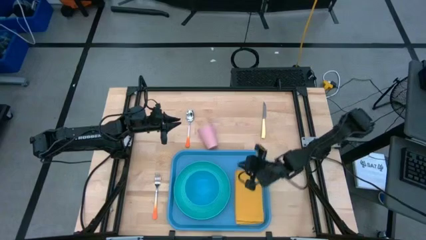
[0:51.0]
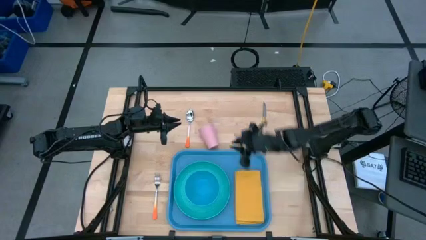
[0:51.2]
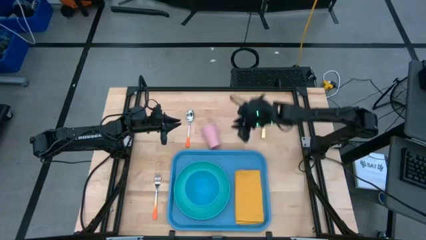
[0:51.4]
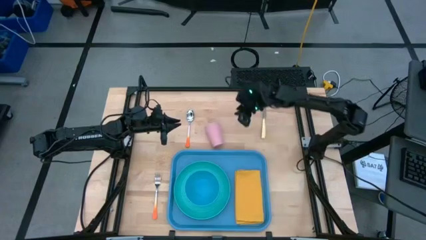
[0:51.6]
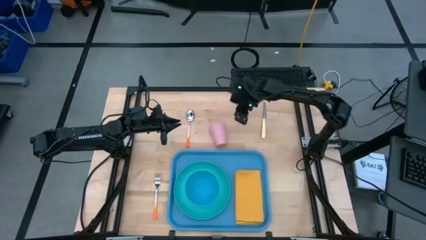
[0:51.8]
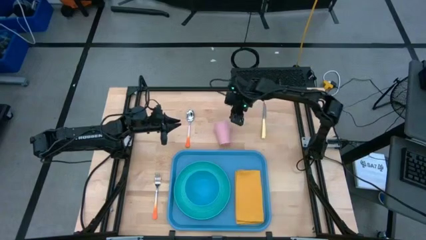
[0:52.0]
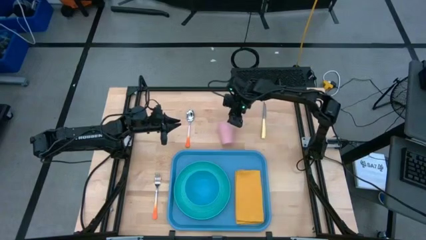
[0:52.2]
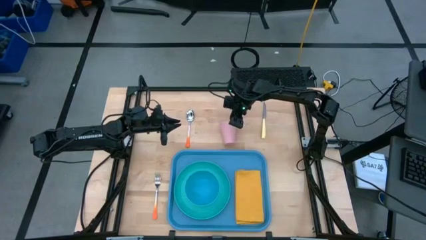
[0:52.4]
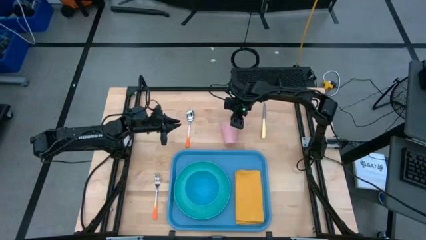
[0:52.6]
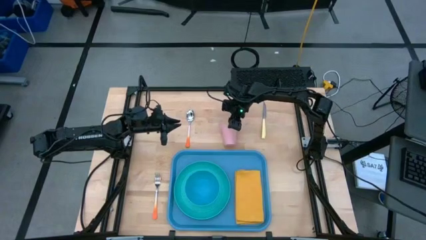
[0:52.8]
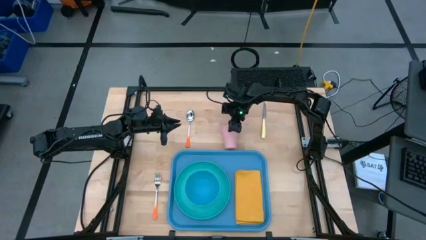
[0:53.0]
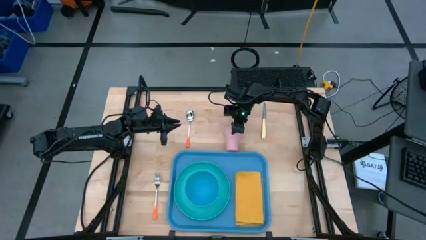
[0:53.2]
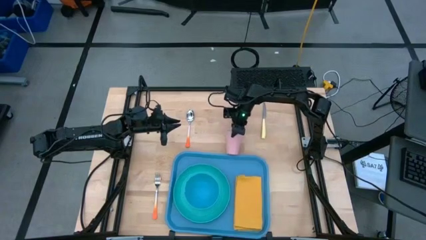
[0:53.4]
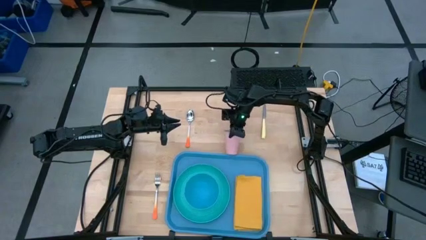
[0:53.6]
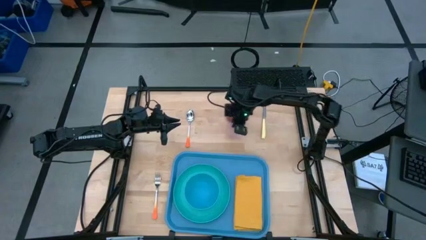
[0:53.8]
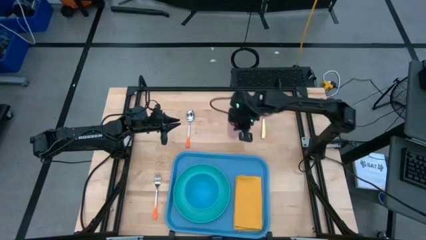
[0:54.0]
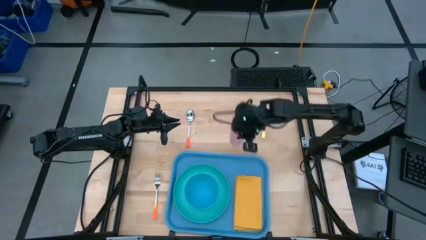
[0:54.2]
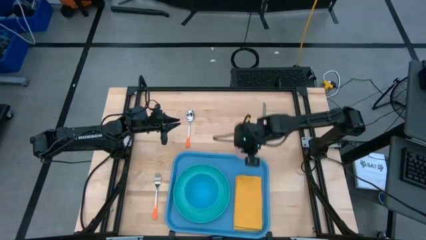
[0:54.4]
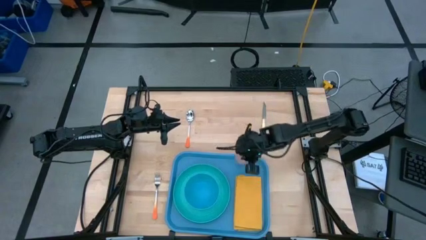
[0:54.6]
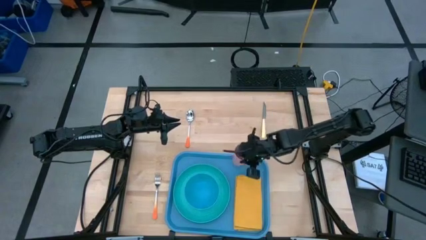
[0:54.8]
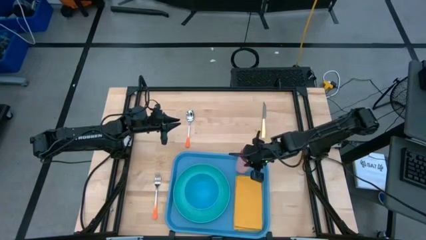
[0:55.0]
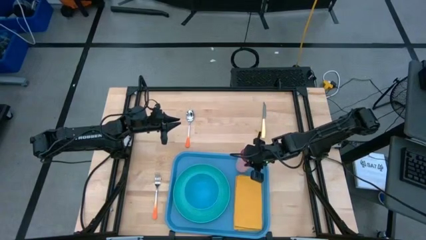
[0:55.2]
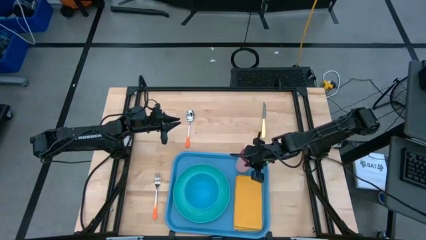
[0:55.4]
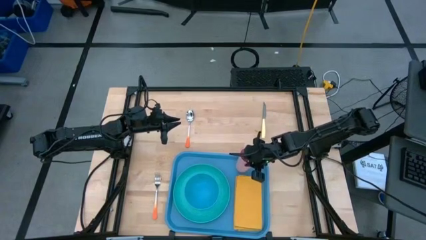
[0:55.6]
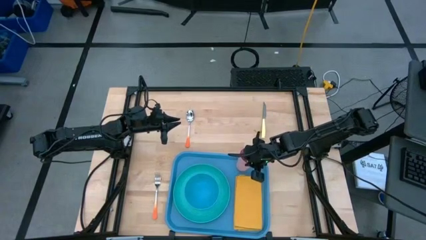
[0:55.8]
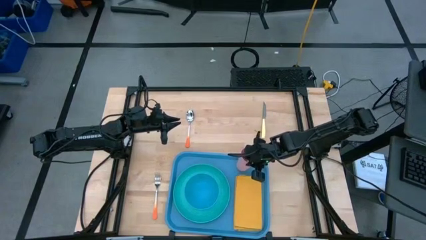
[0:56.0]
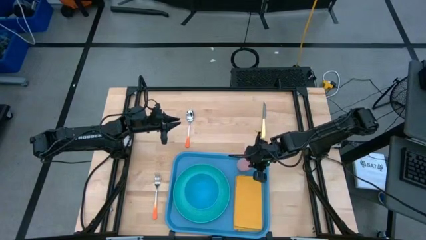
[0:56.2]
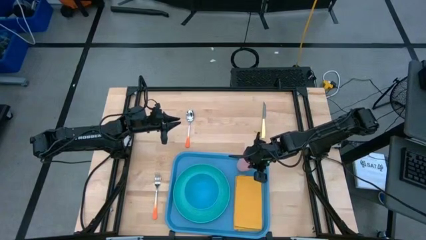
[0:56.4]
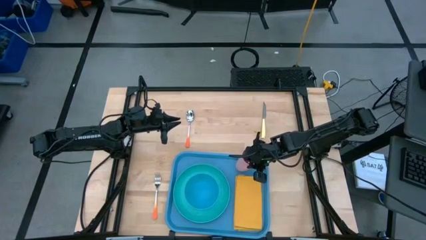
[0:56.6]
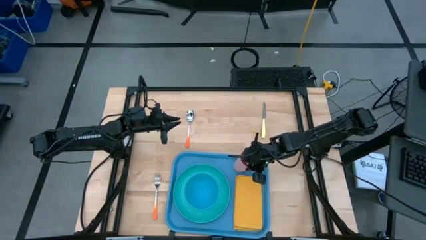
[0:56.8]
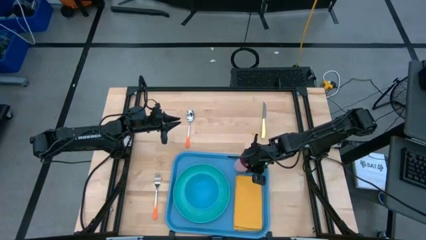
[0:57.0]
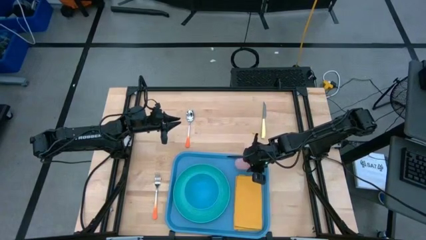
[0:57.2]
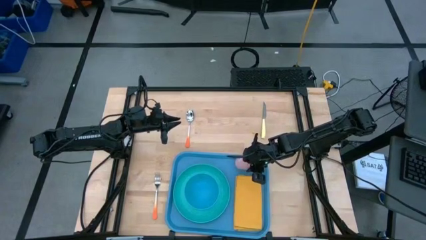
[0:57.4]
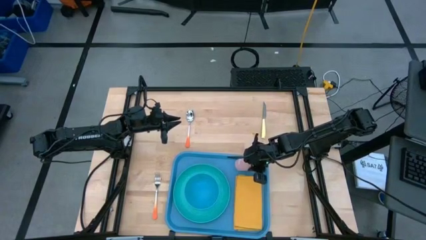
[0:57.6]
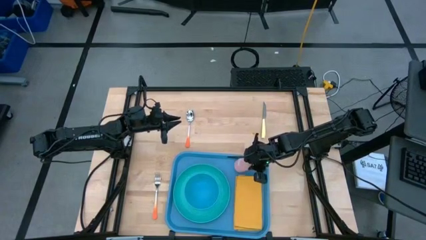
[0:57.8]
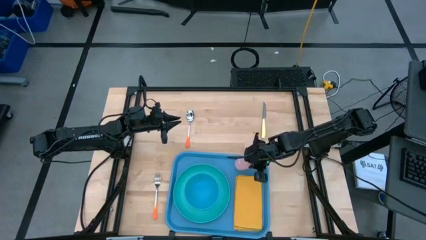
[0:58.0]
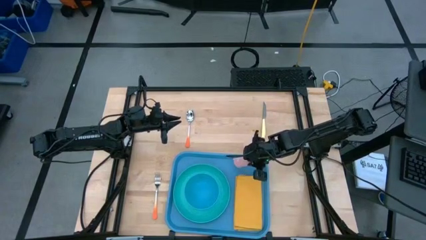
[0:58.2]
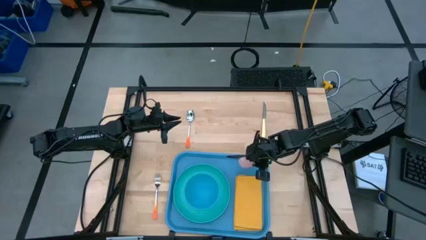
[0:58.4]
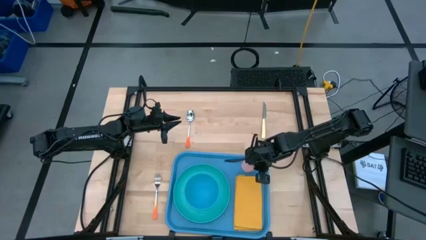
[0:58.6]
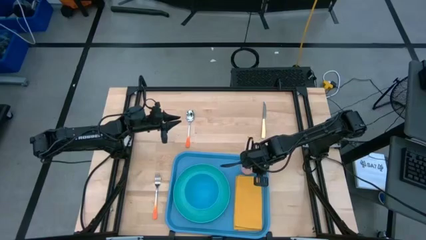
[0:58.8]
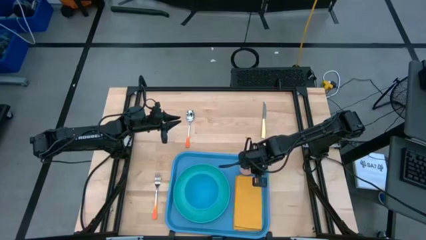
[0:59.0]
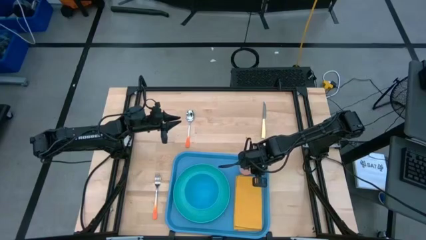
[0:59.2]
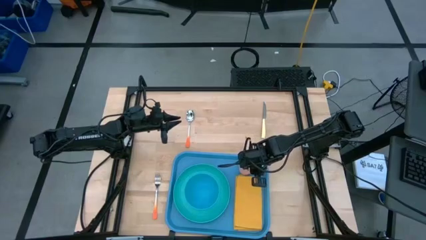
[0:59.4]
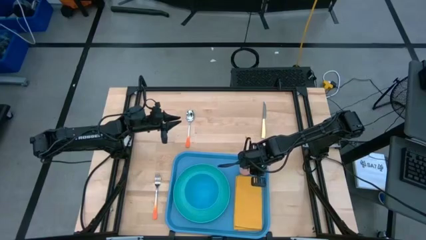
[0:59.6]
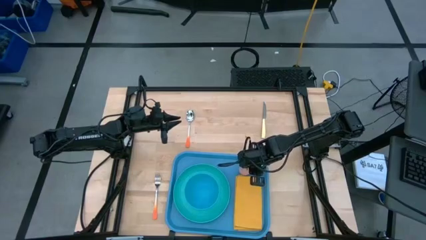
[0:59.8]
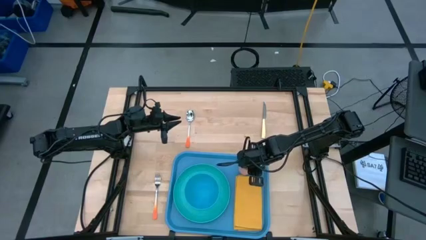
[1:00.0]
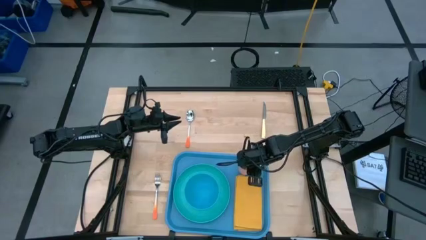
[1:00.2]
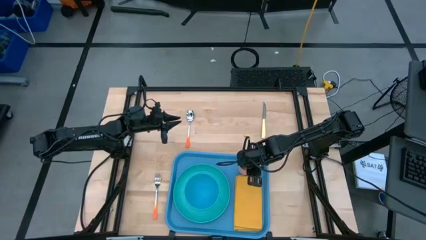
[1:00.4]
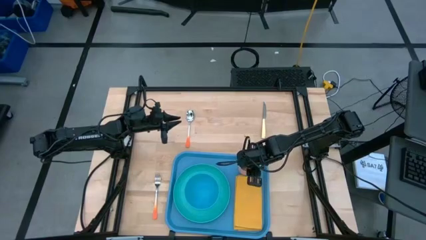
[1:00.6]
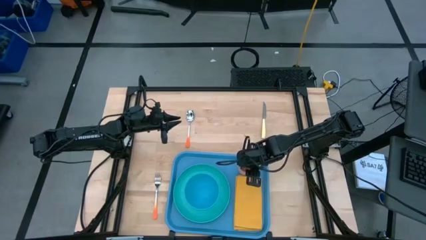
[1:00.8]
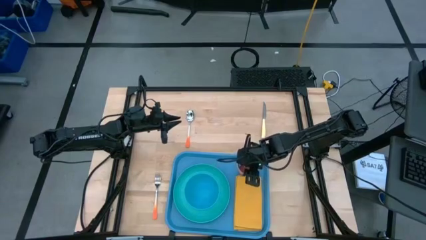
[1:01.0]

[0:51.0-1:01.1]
Task: Set up tray
Put the pink cup on the blue serving tray to the top of the yellow napkin

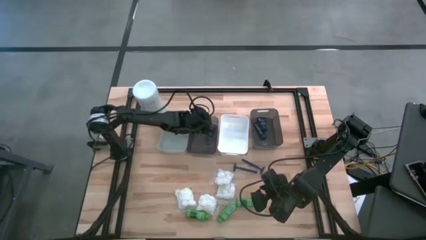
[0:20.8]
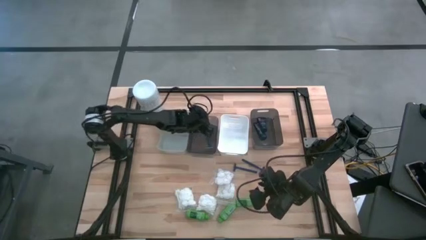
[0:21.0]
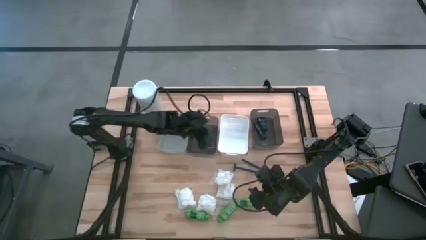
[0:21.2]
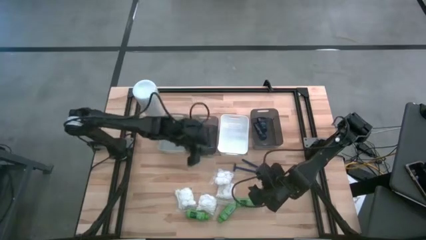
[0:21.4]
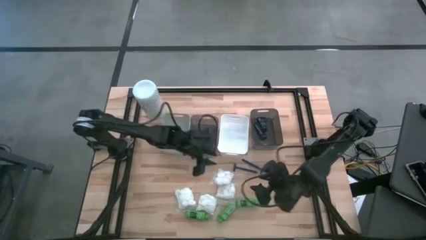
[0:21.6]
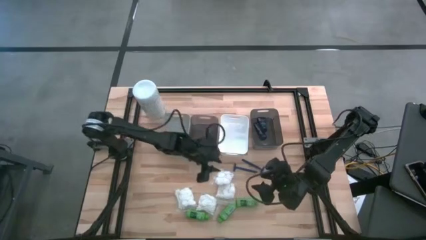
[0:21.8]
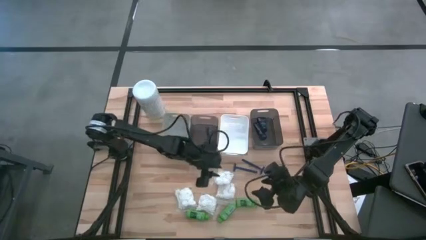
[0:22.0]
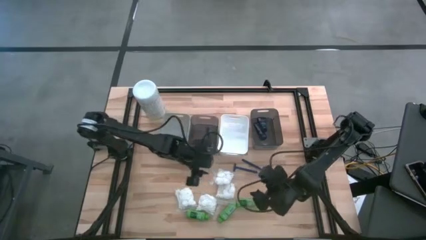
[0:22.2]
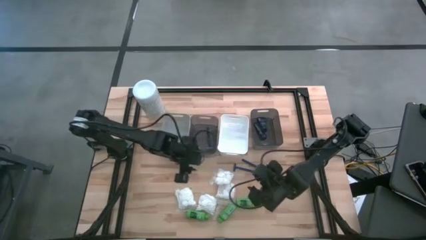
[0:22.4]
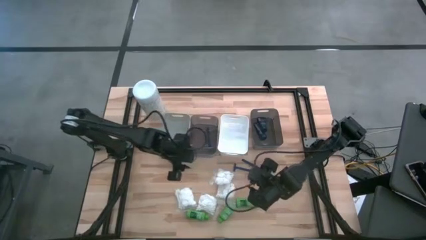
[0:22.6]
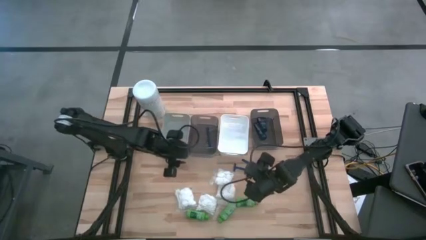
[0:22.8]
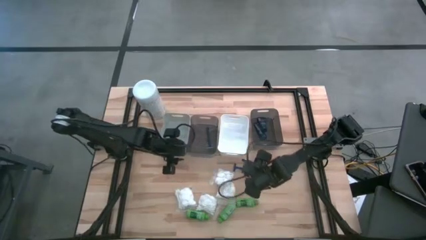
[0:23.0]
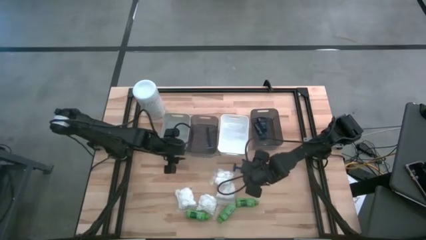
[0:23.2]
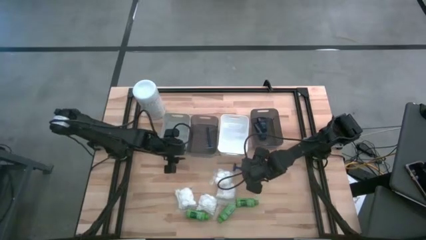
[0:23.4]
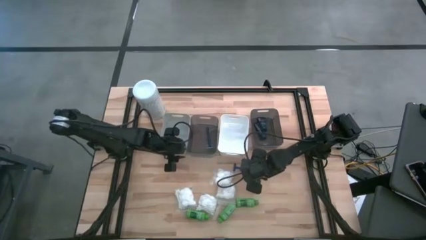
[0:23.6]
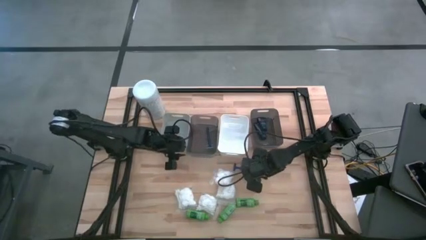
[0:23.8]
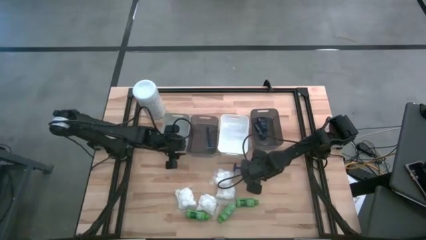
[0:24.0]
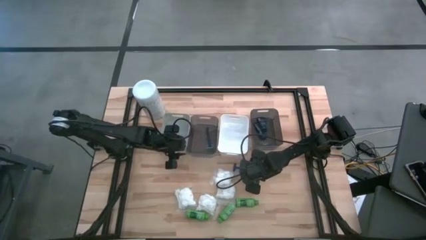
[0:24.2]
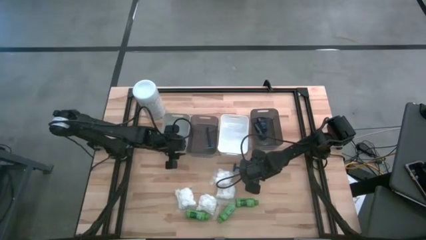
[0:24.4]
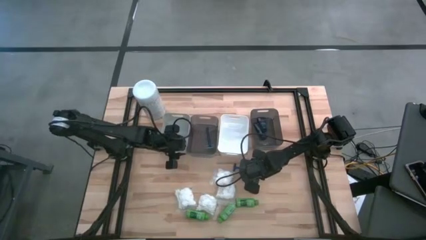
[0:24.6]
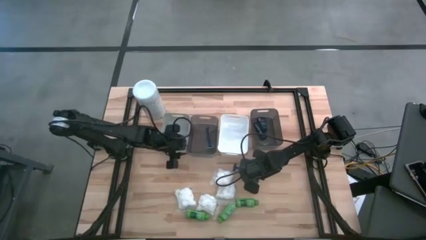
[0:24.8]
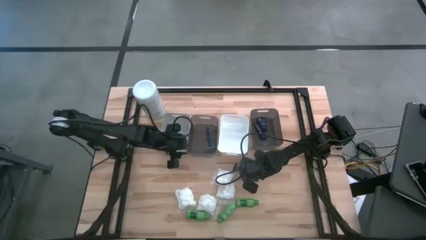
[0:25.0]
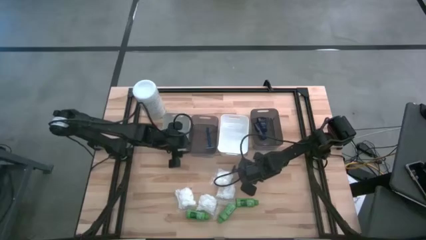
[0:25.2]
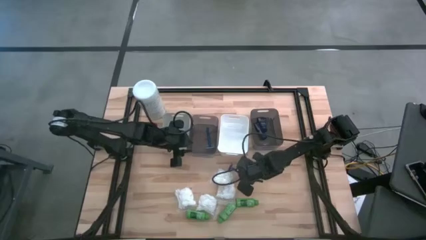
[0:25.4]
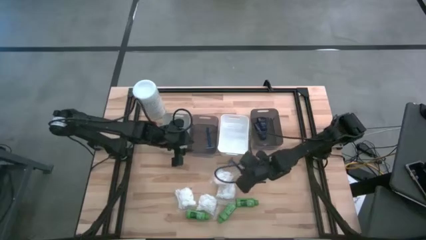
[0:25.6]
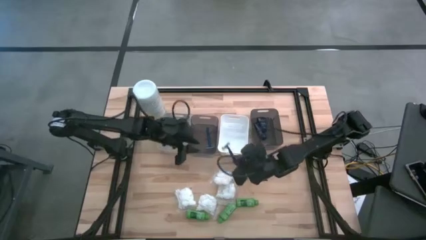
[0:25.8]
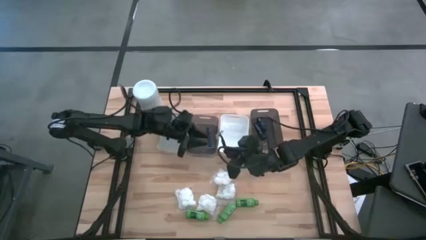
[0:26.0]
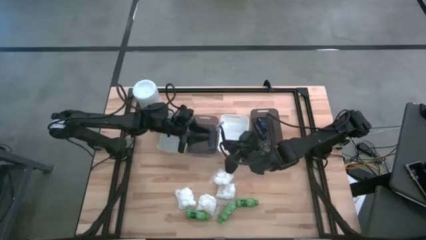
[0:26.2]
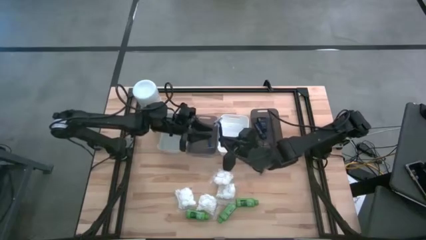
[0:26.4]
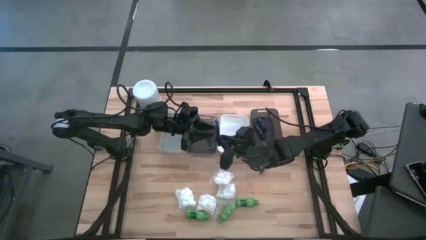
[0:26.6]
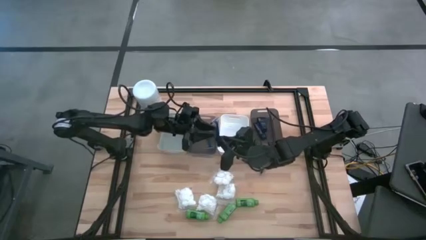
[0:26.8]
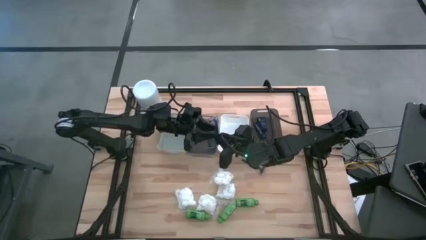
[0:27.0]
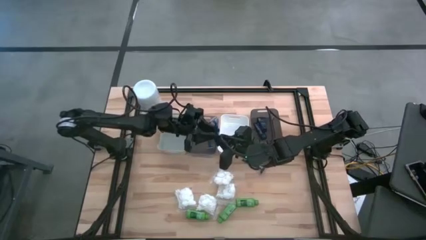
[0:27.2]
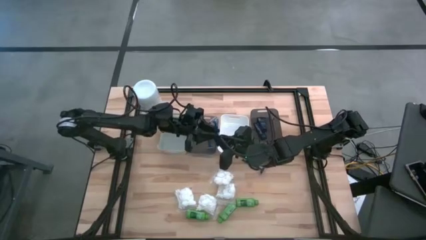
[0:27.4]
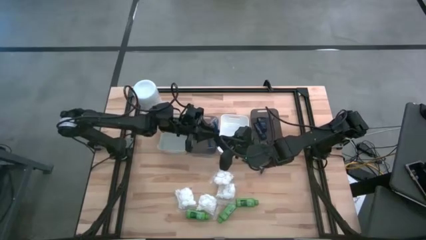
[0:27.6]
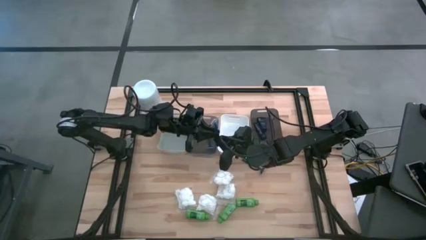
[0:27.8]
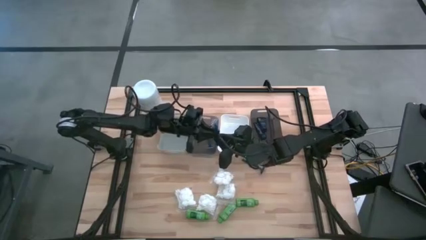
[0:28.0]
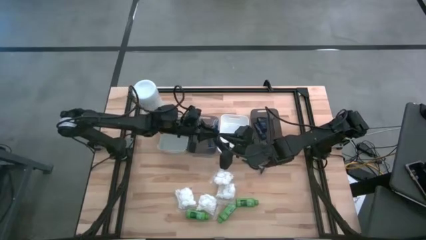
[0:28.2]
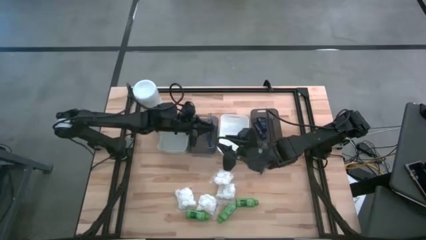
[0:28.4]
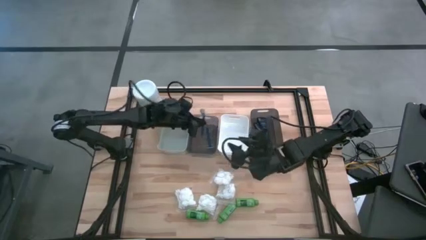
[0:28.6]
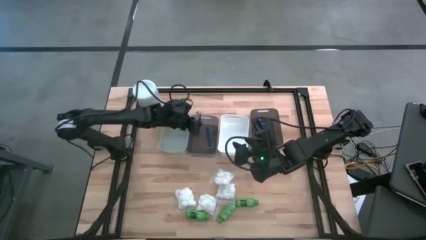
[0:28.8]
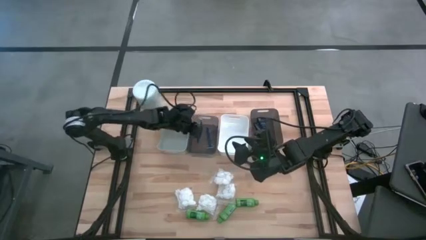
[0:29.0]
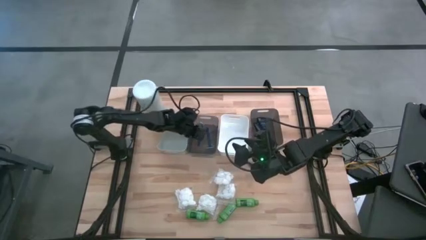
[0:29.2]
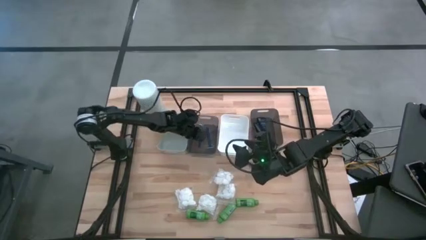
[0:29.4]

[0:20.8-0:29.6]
Task: Pick & Place Travel size toiletries
Put the blue razor into the left black bin
